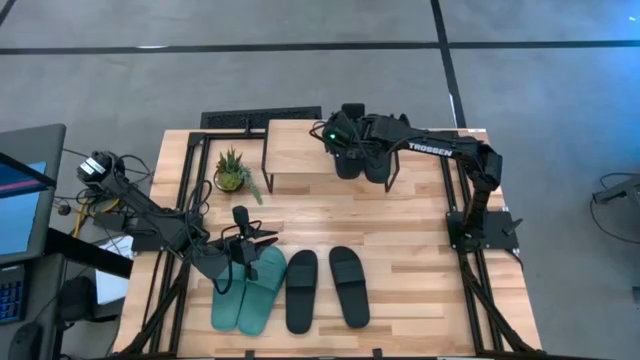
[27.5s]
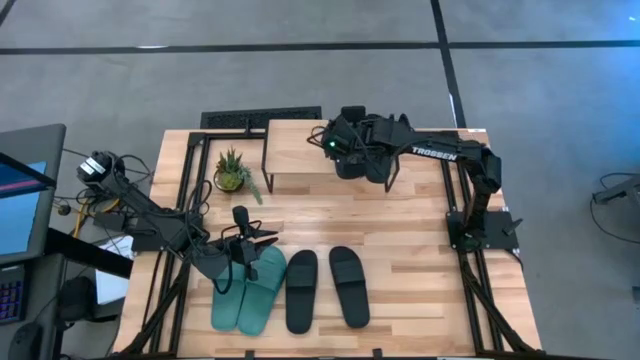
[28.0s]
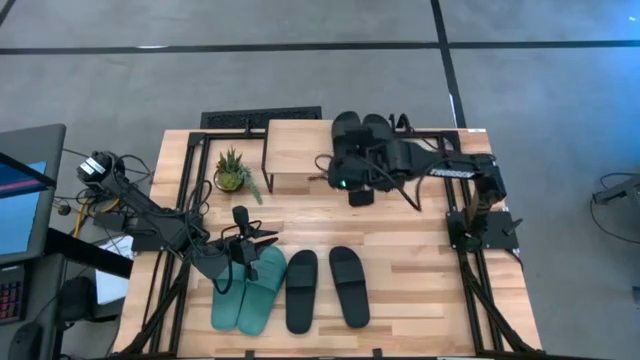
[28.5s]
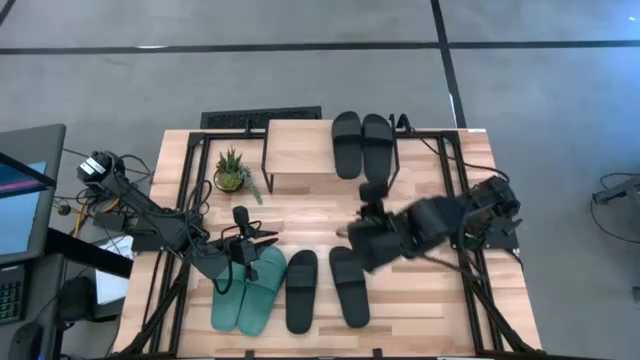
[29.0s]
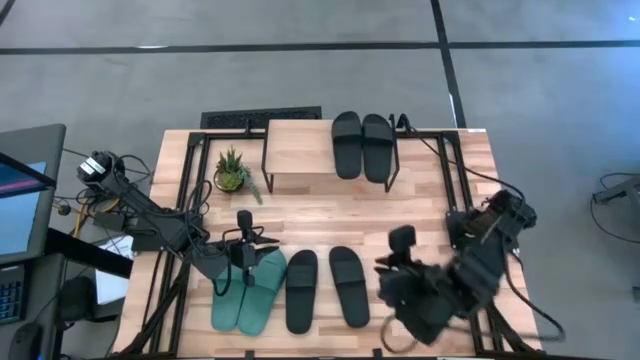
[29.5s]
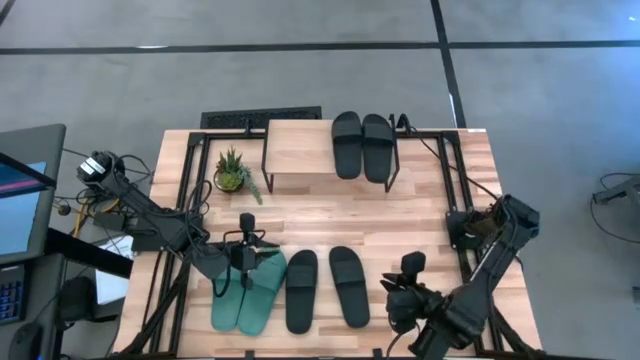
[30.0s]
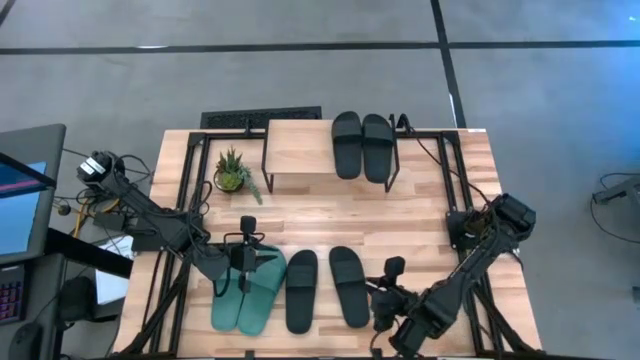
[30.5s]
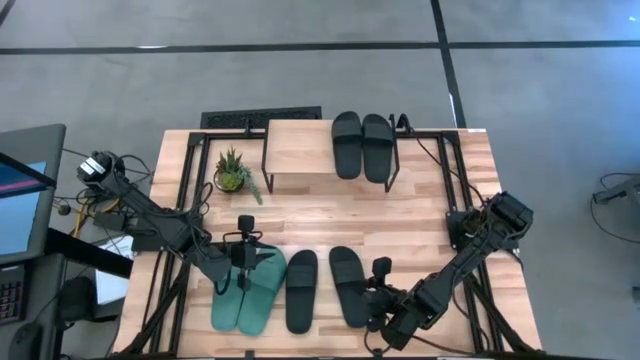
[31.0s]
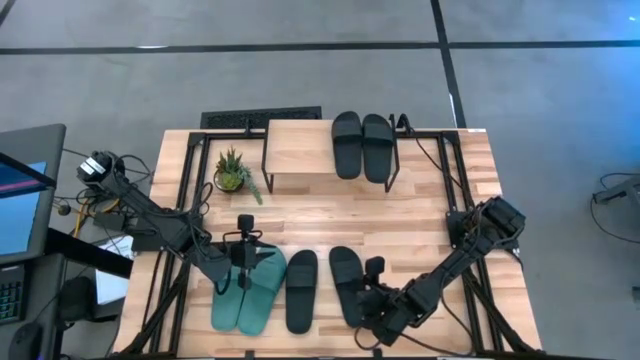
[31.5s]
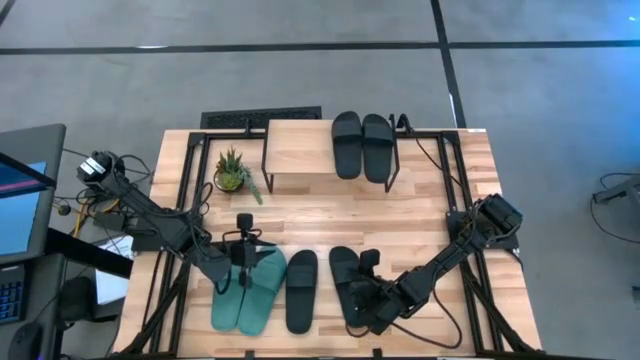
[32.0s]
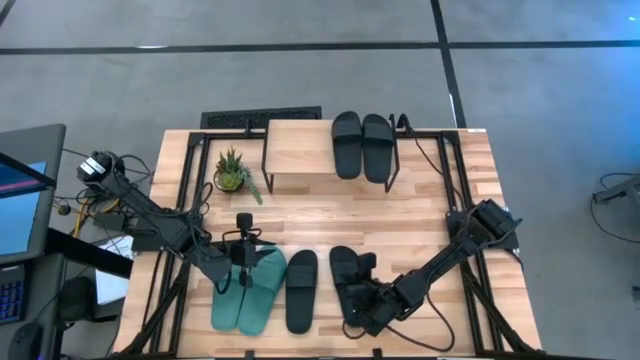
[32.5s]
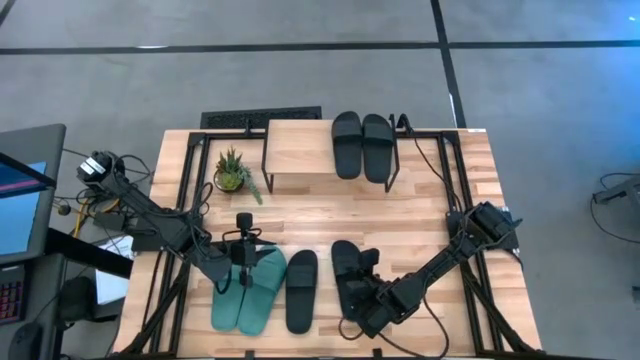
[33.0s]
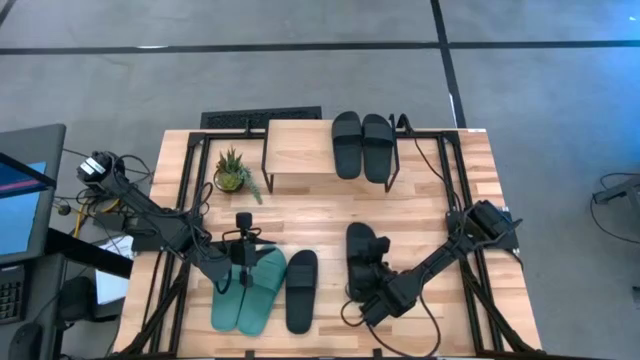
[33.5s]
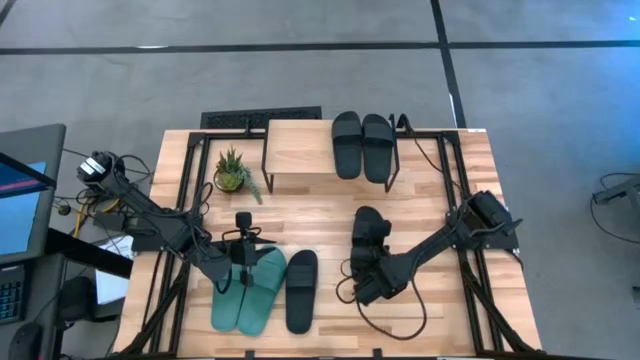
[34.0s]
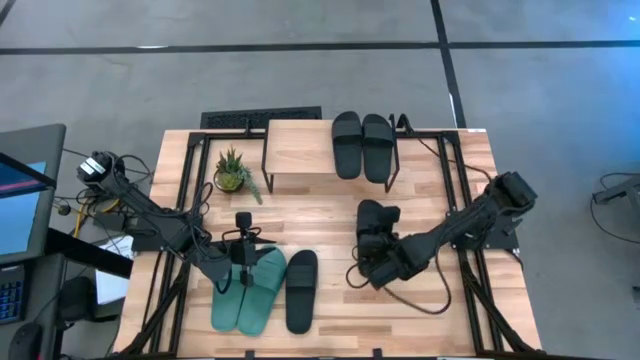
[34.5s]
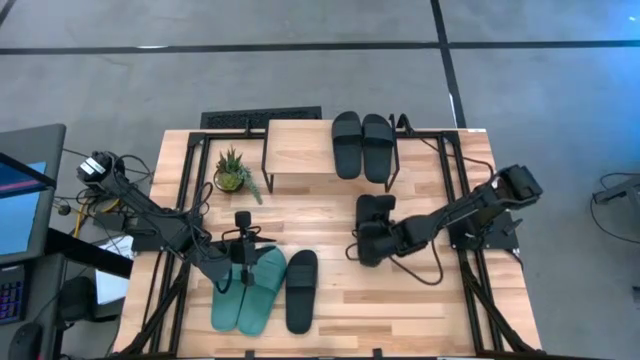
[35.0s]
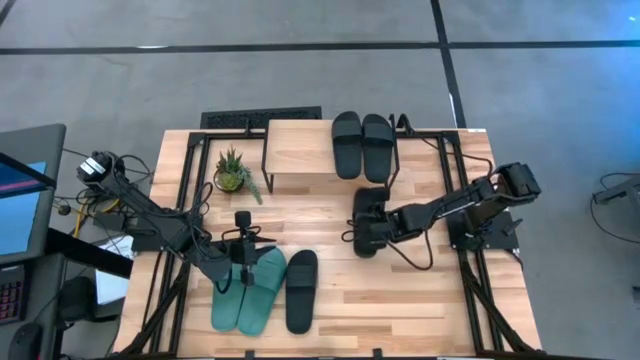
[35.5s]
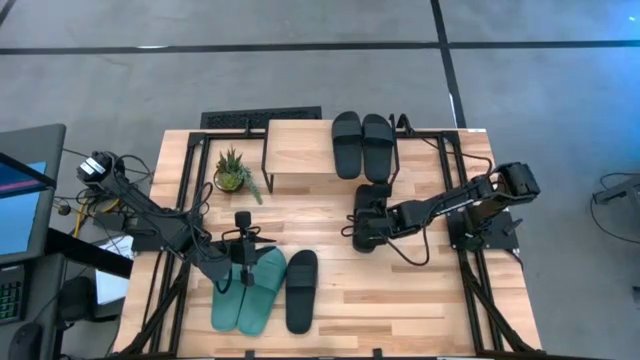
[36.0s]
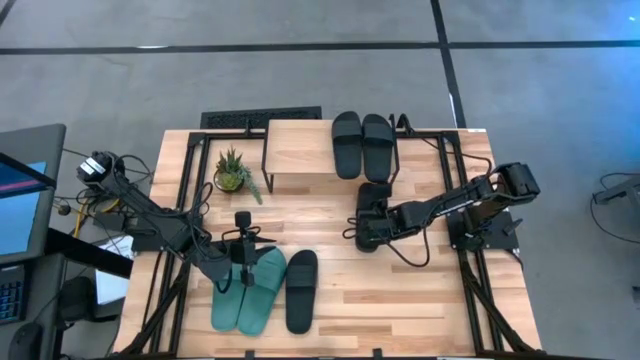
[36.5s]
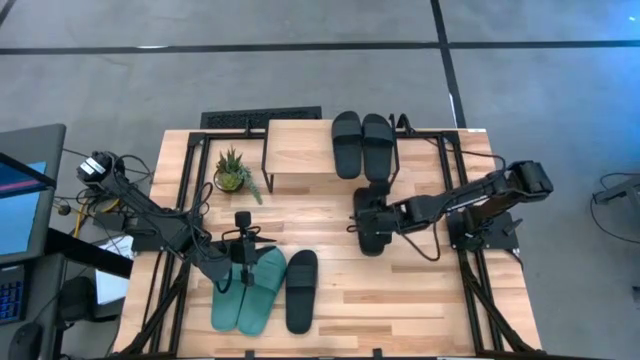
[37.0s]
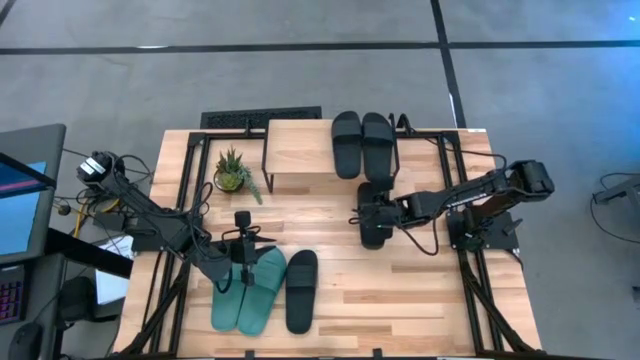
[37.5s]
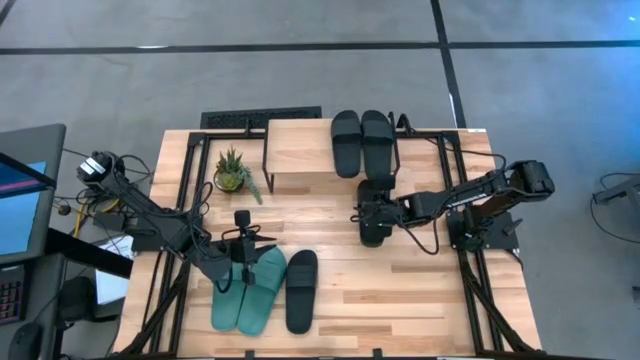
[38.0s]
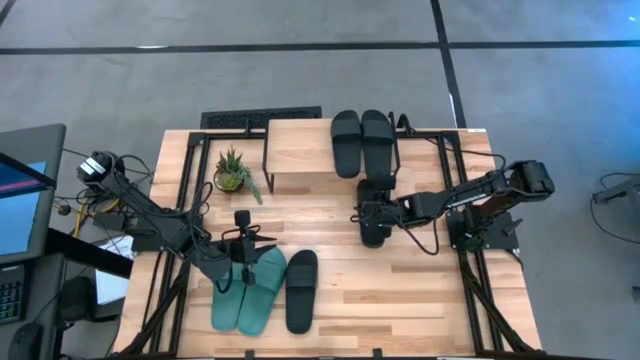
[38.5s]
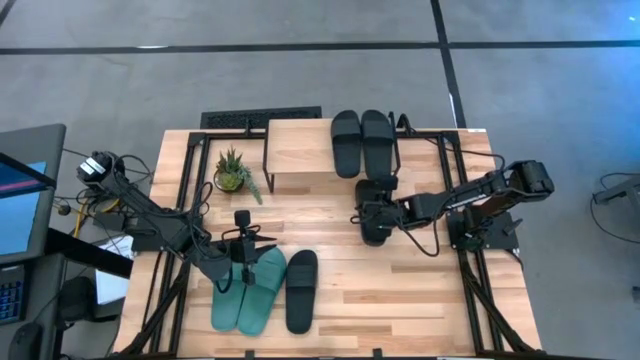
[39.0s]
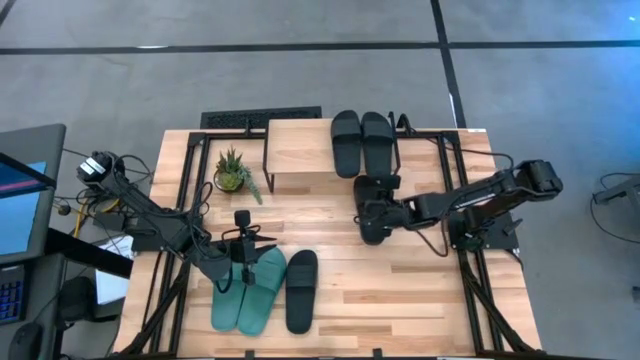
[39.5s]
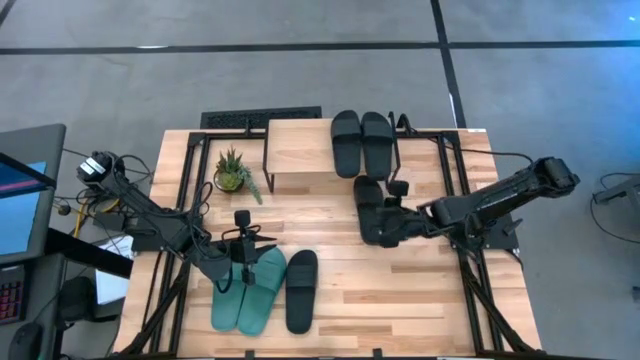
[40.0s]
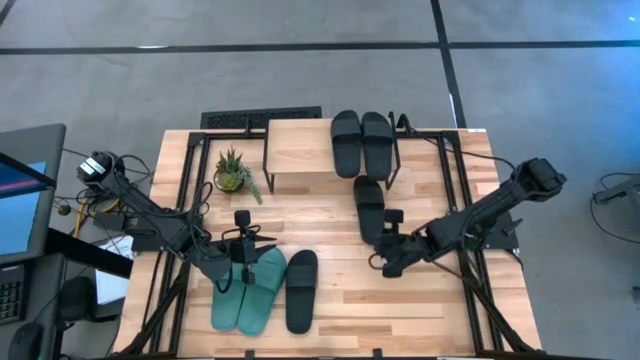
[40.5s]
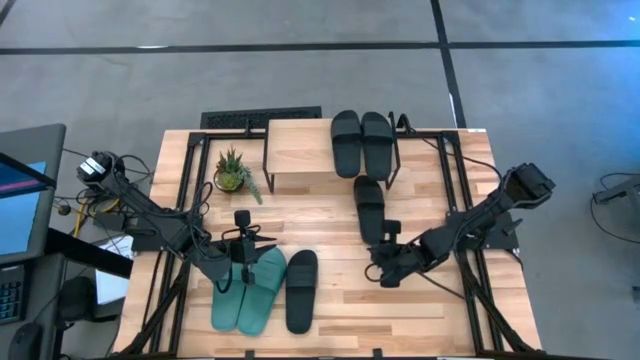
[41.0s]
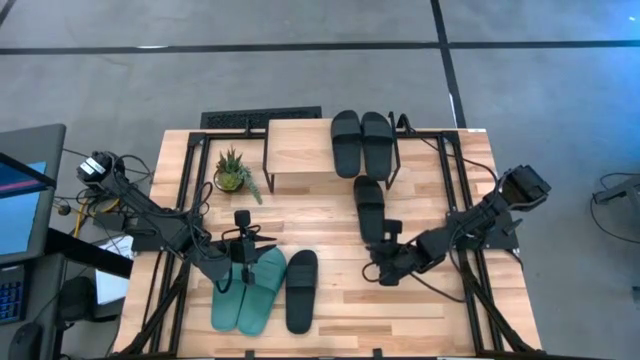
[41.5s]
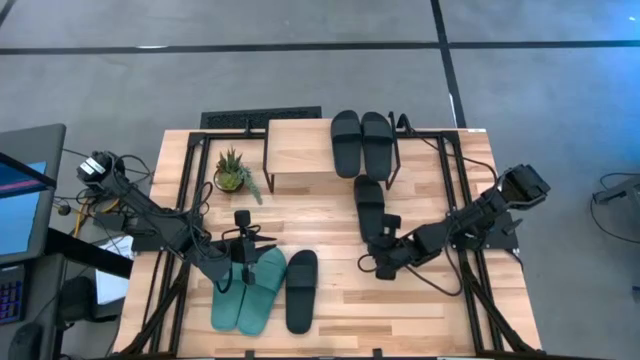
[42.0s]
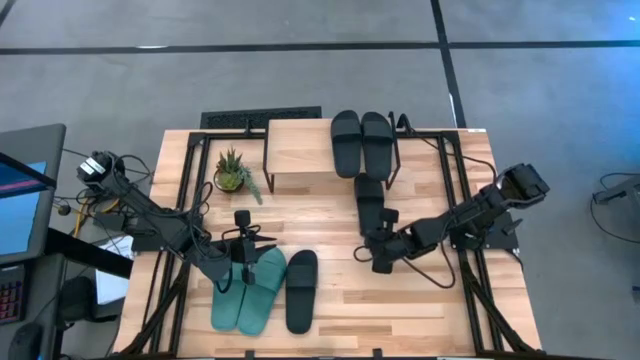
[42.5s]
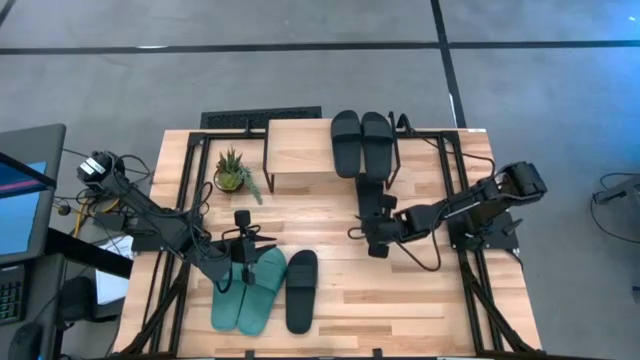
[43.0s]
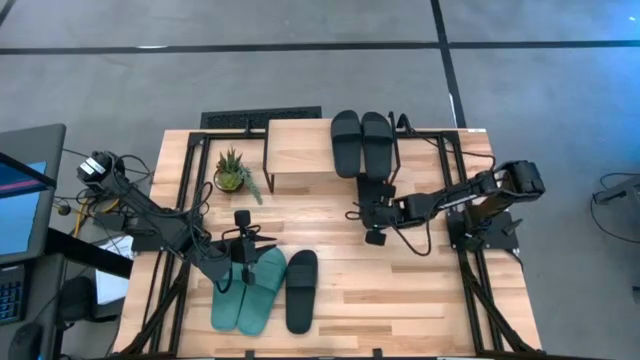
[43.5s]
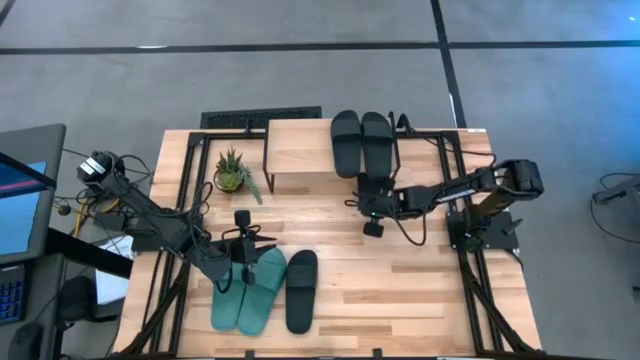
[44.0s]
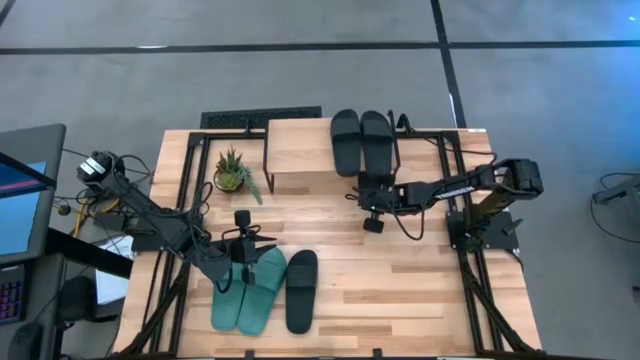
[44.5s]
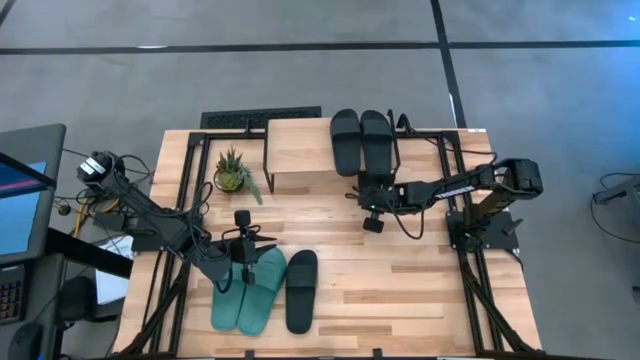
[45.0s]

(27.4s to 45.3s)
Task: Pick and place slides into the shelf
Put the black slipper under the shelf

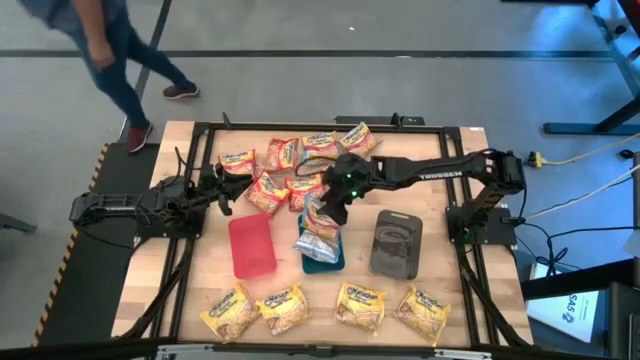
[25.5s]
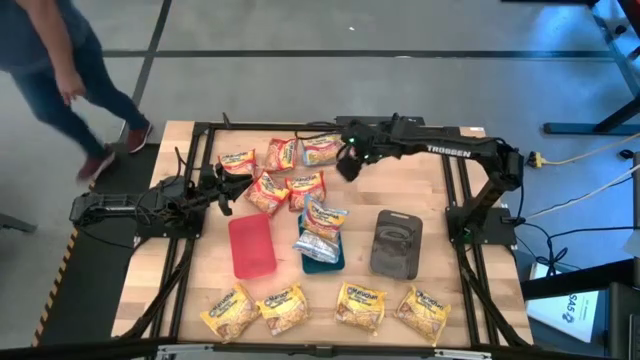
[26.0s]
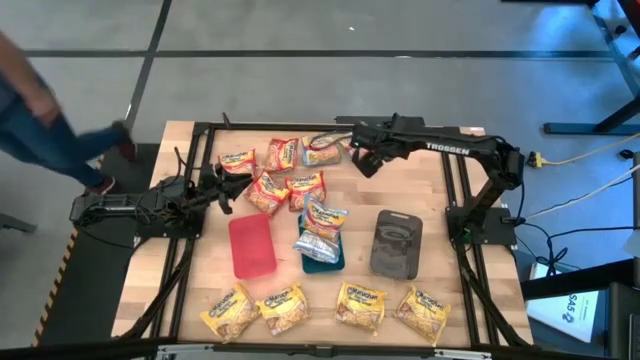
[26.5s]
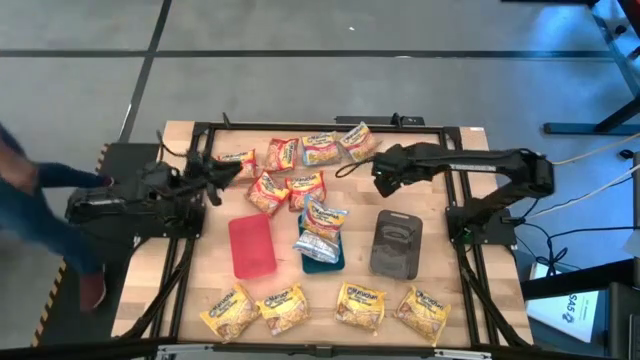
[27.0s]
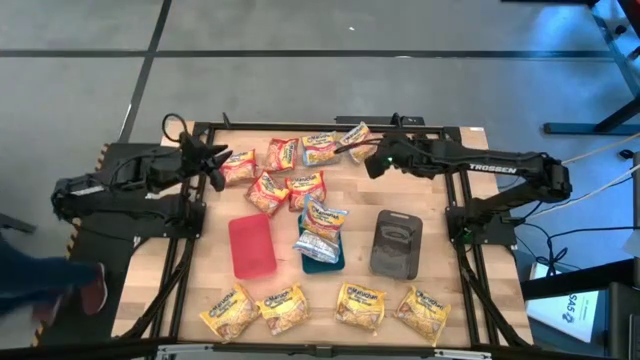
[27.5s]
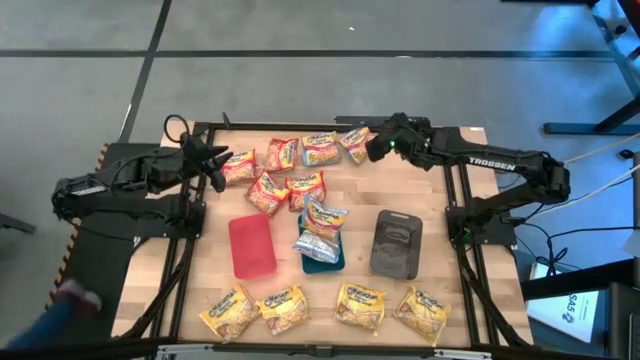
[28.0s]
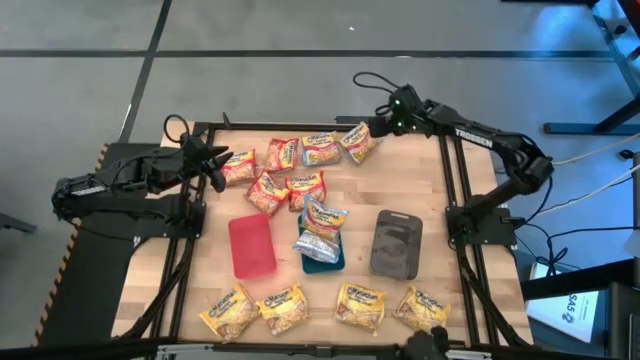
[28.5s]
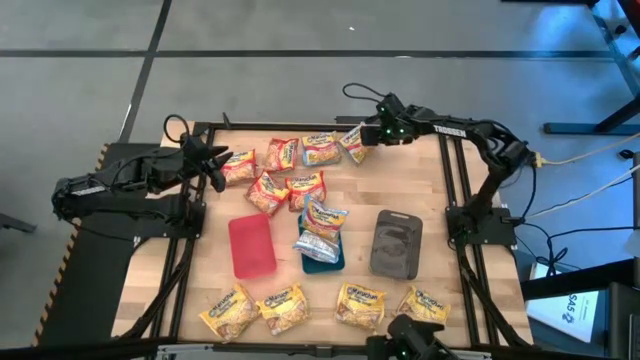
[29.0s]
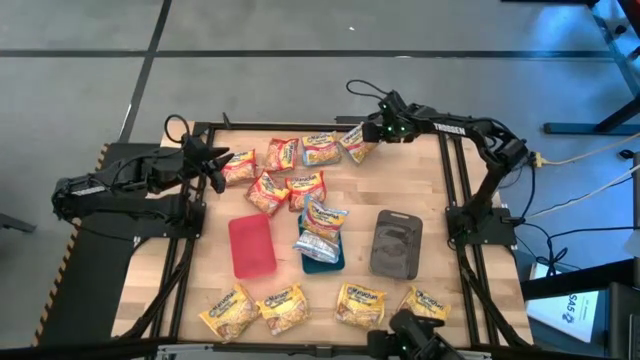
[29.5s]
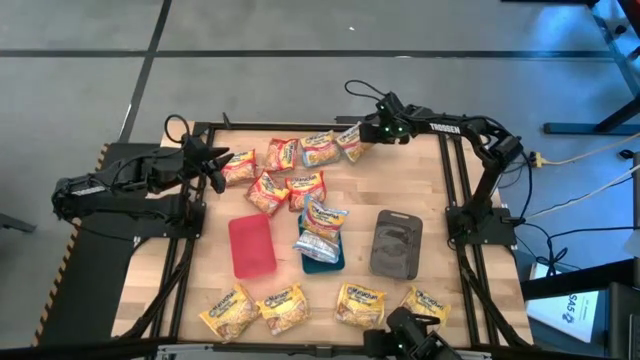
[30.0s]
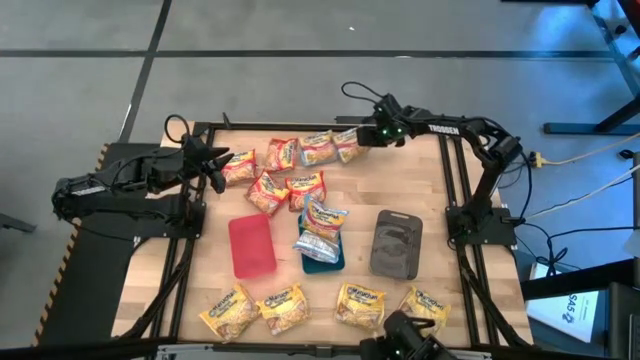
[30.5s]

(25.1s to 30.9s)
Task: Sort Maruchan noodles
Put the blue noodle pack into the blue bin
